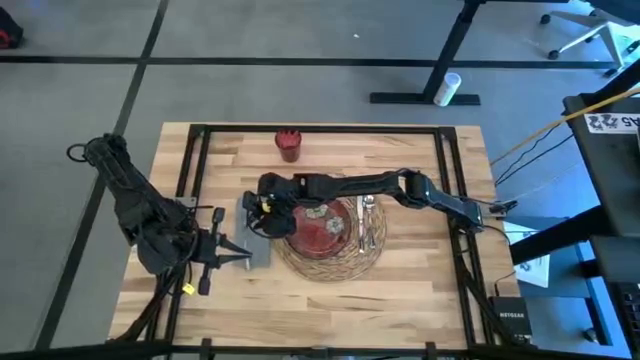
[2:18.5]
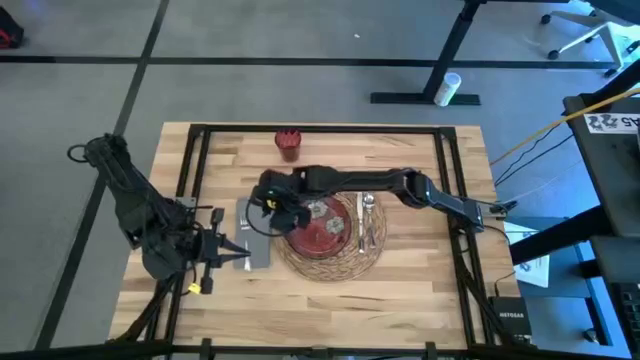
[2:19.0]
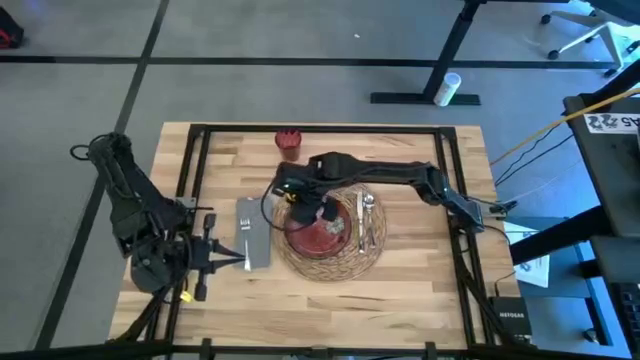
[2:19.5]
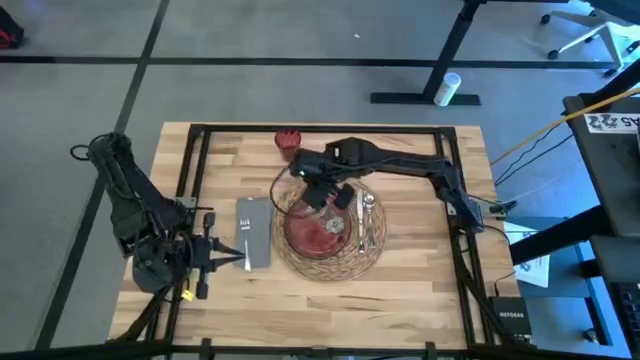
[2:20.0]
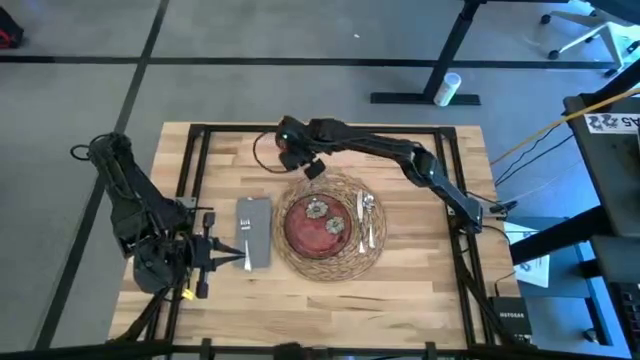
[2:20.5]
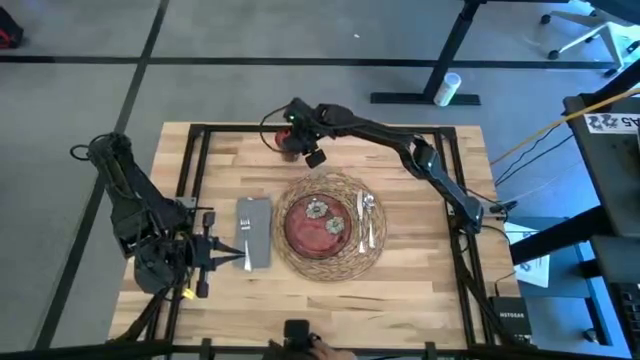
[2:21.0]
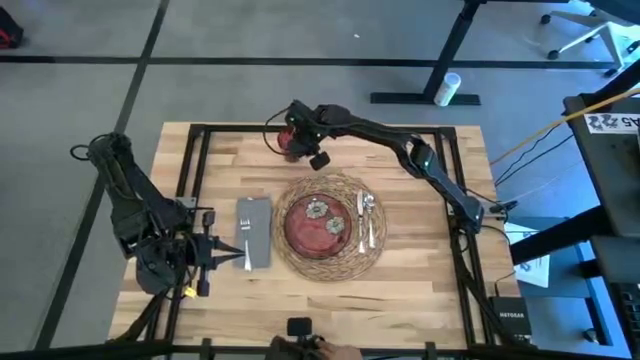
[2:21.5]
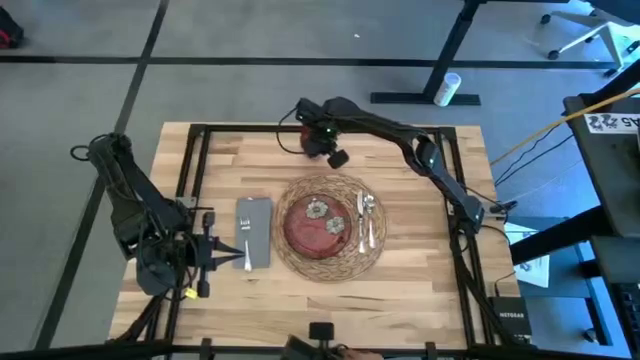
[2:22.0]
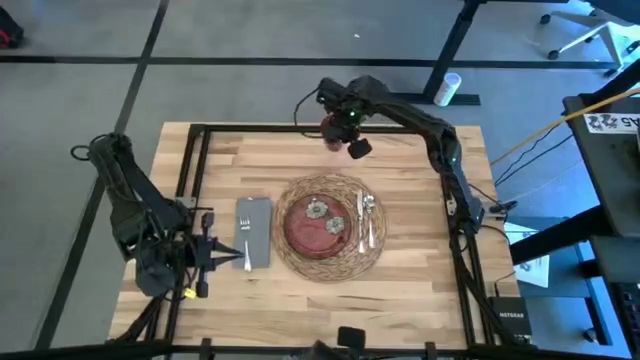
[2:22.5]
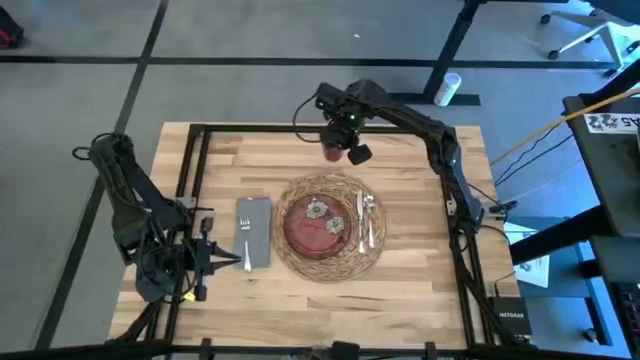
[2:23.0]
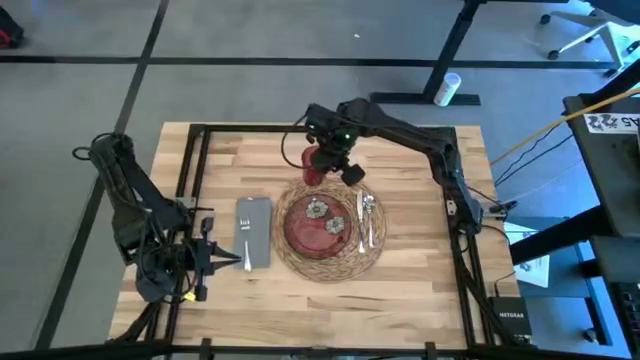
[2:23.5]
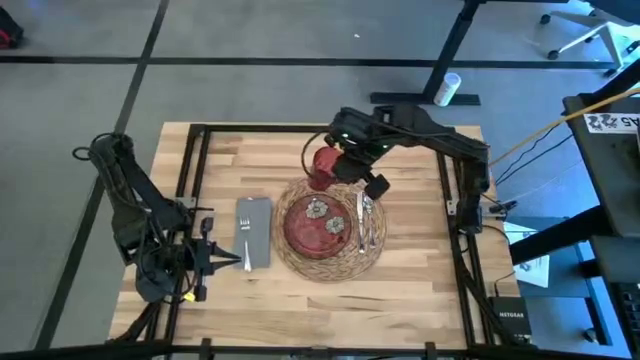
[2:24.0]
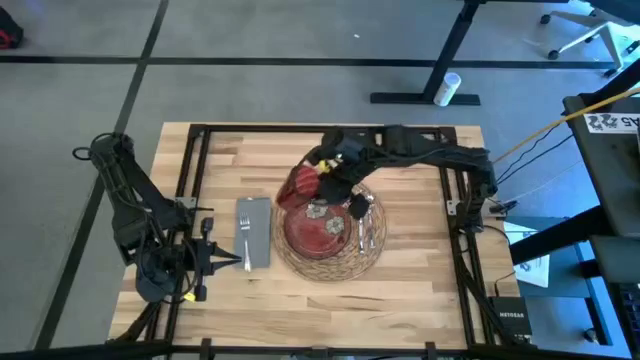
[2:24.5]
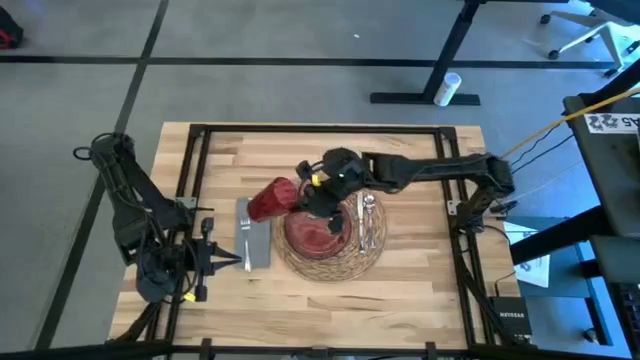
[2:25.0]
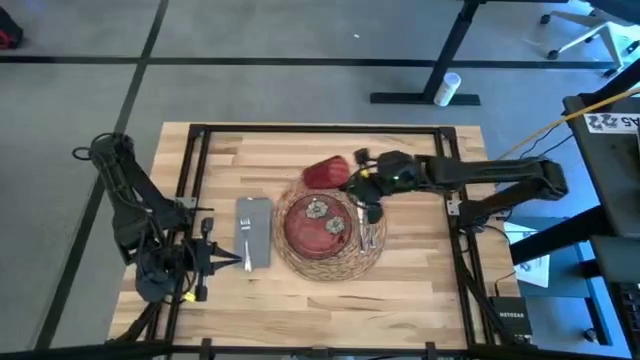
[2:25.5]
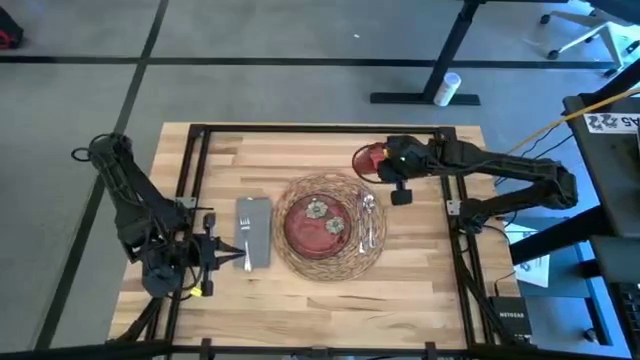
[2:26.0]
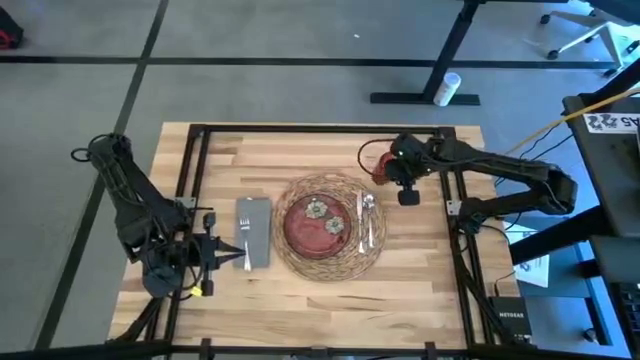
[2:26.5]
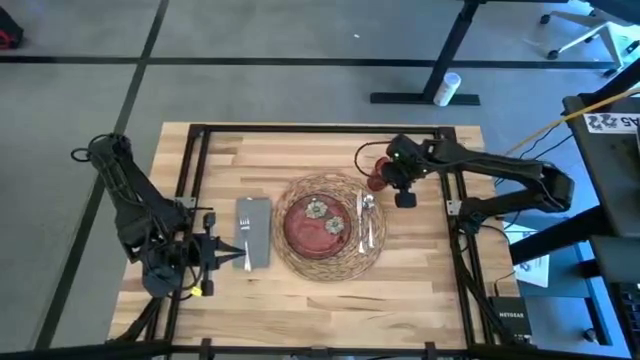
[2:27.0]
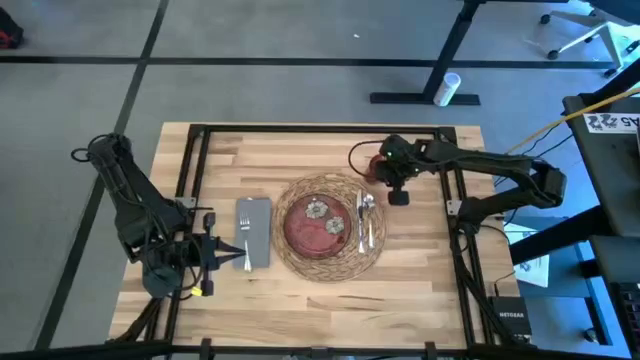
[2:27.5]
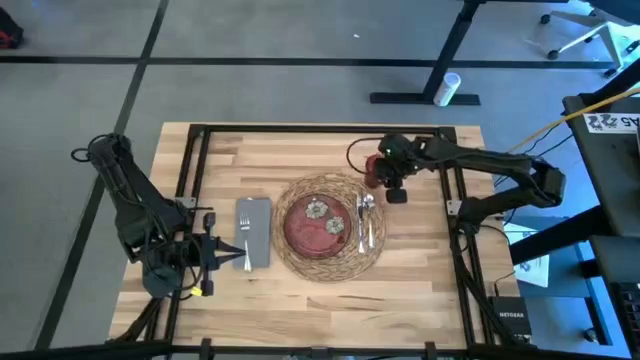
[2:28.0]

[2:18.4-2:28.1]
Task: Set table place
Move the red cup to the top right of the brown placemat

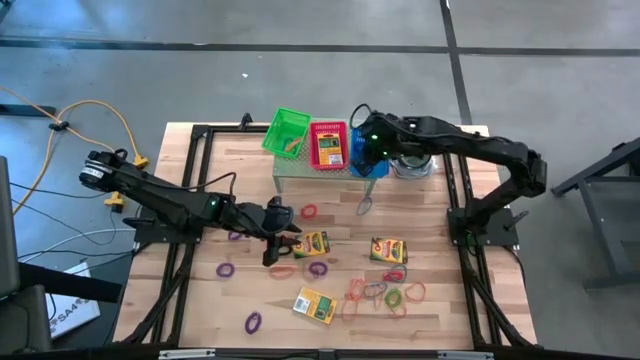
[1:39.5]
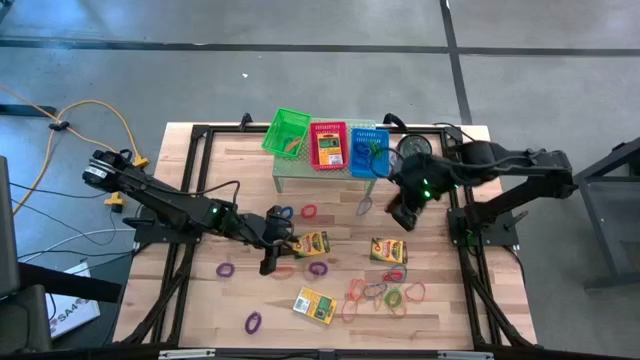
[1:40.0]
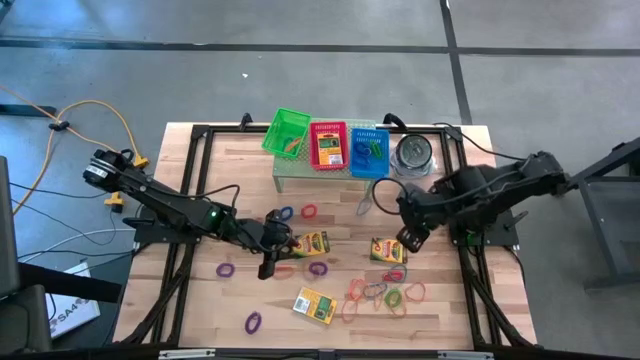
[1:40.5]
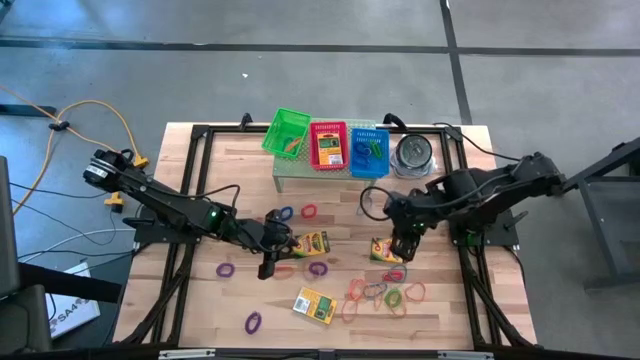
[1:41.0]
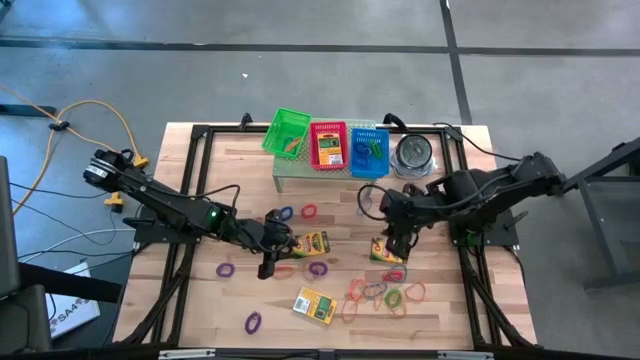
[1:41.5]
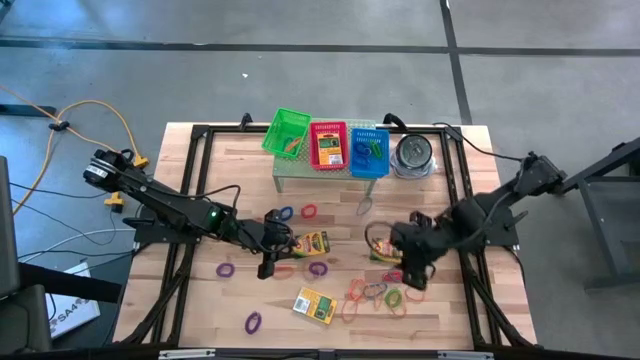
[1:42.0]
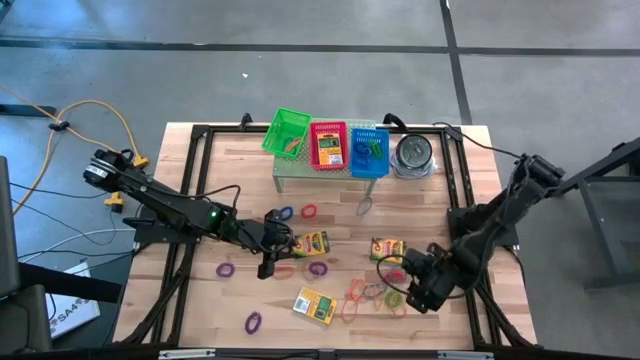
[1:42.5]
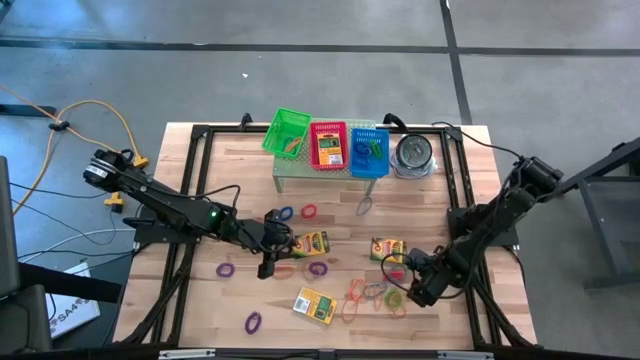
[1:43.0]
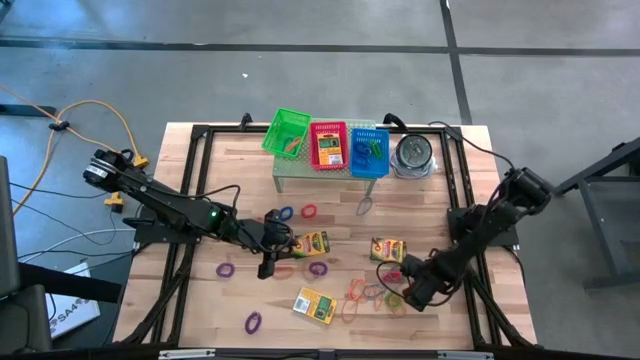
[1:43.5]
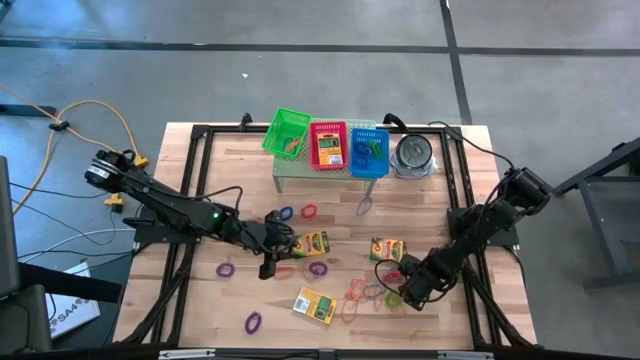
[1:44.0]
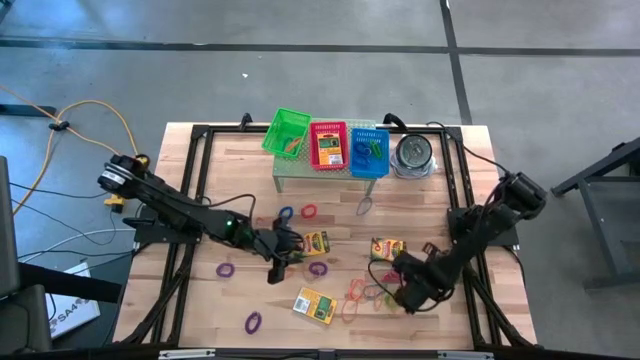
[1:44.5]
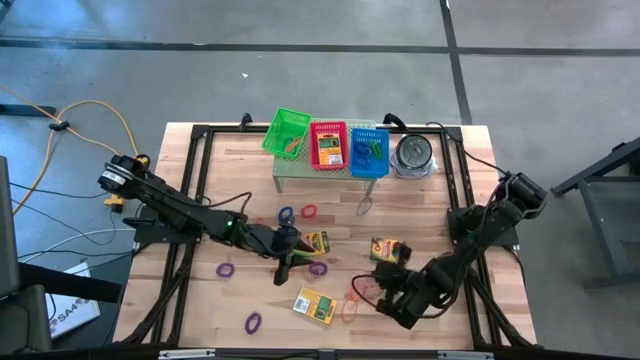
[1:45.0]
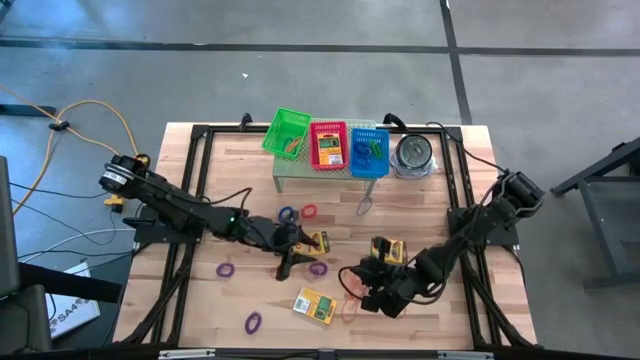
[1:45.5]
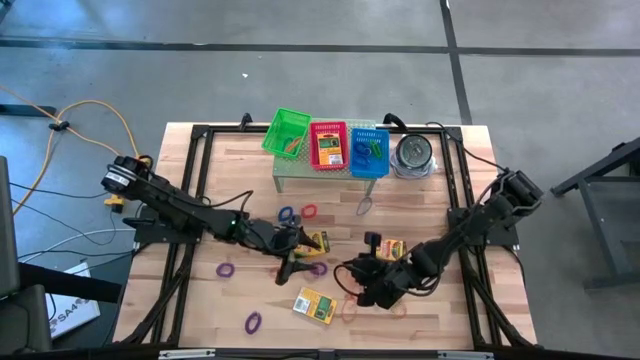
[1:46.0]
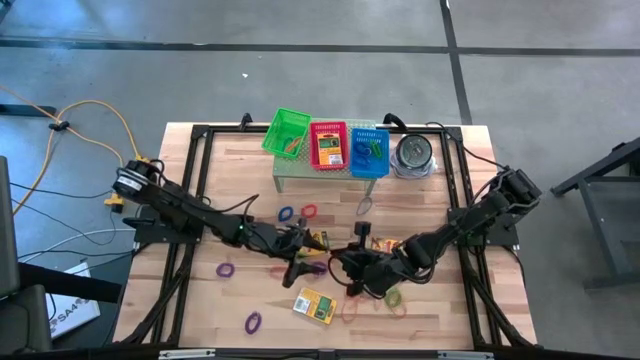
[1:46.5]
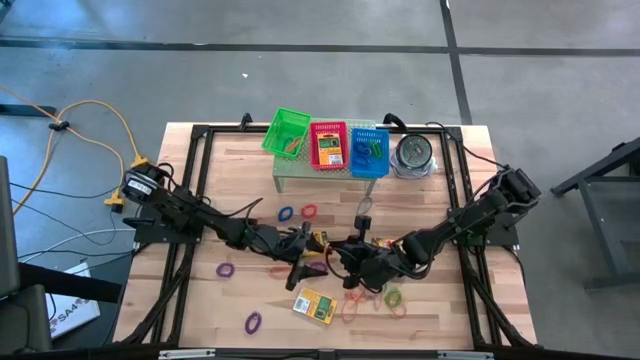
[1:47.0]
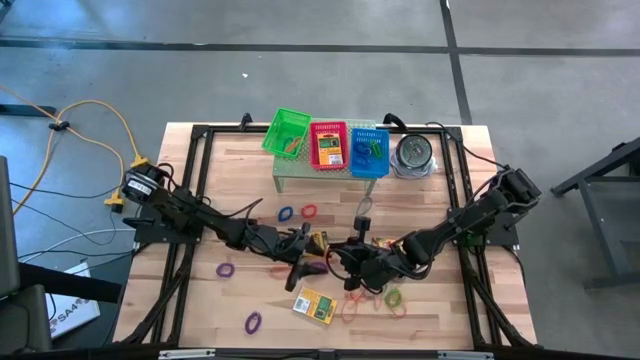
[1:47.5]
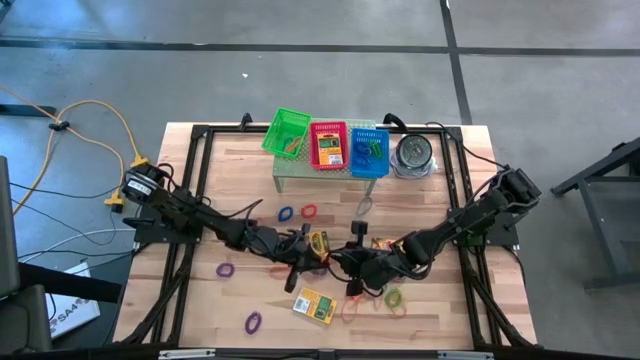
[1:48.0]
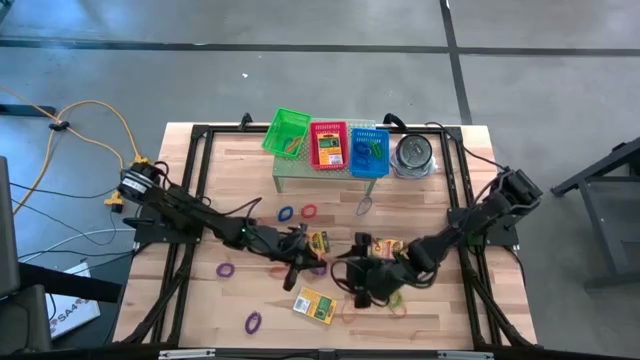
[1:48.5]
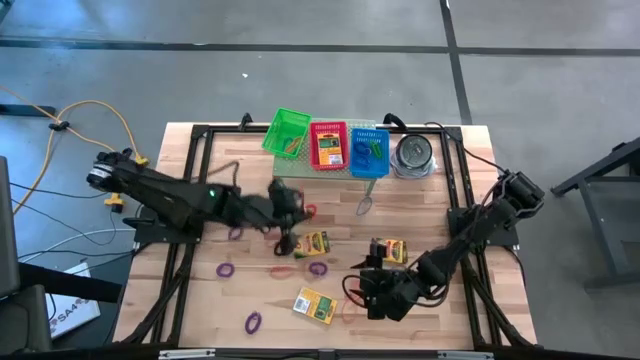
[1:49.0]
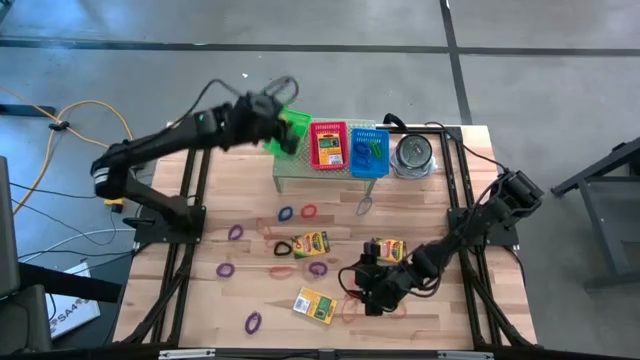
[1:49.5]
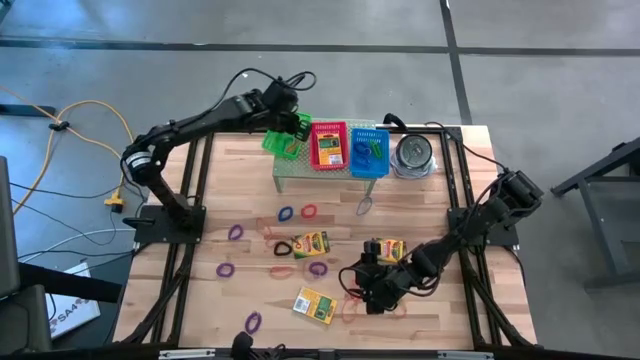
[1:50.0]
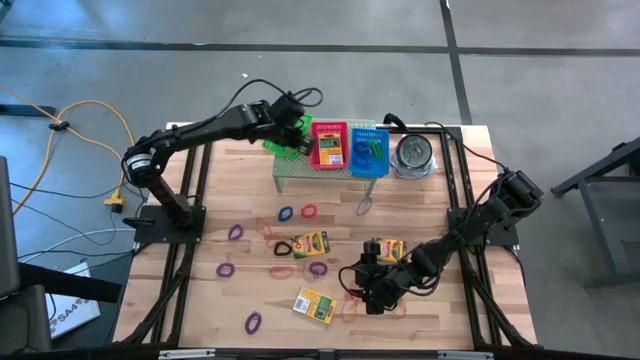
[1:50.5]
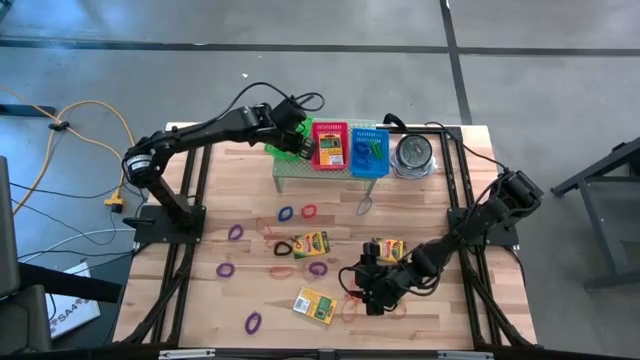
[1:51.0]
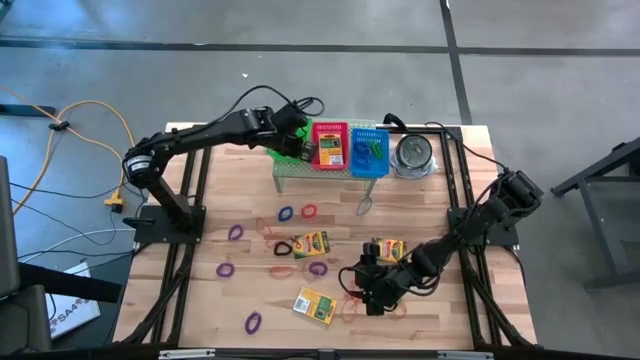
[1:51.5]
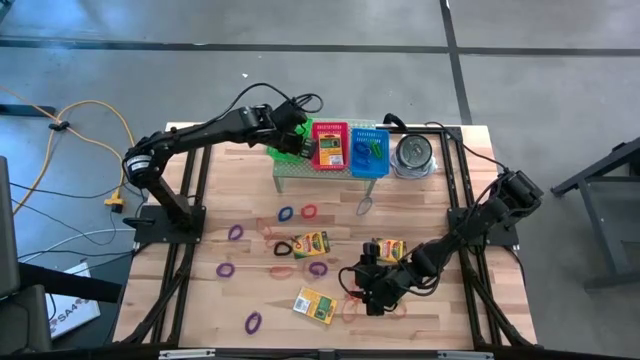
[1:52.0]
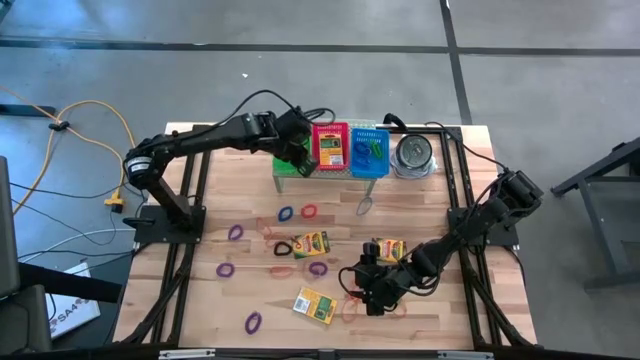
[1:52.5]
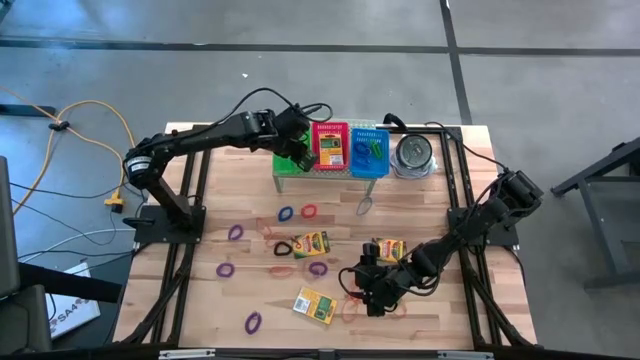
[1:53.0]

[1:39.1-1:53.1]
Task: Pick & Place Office Desk Supplies
Put the orange rubber band into the green bin on the shelf
